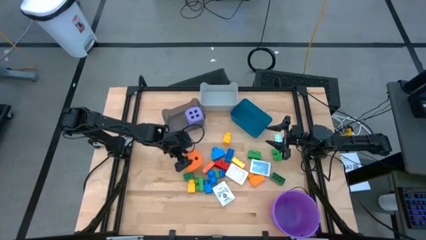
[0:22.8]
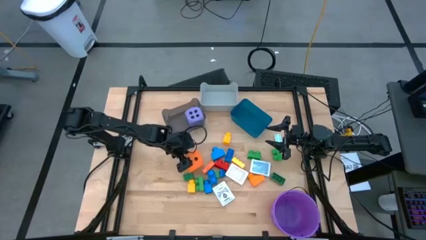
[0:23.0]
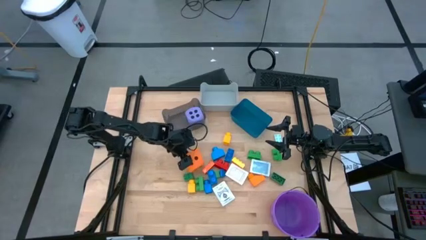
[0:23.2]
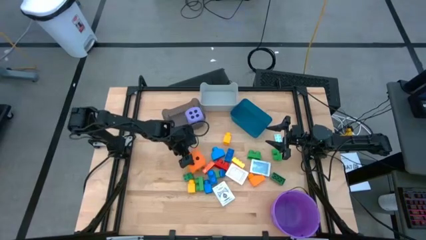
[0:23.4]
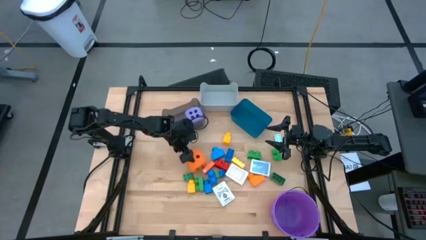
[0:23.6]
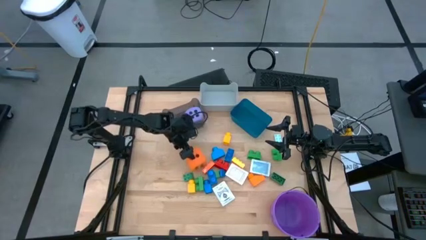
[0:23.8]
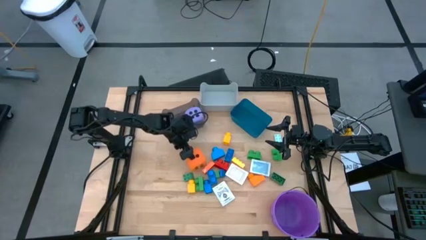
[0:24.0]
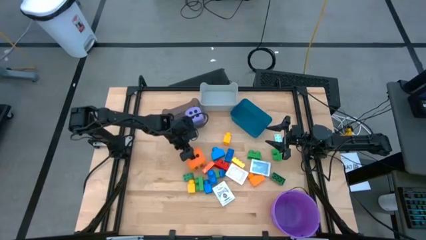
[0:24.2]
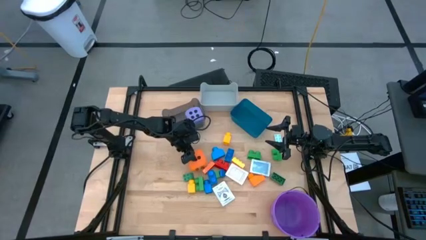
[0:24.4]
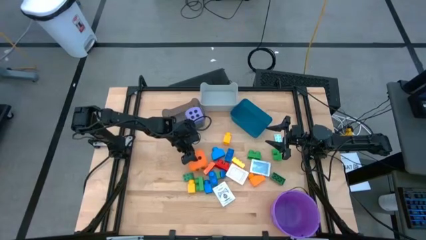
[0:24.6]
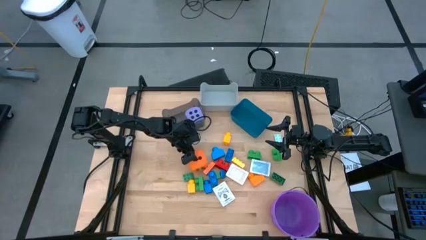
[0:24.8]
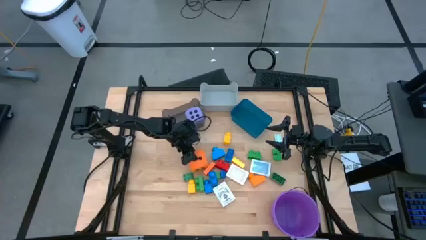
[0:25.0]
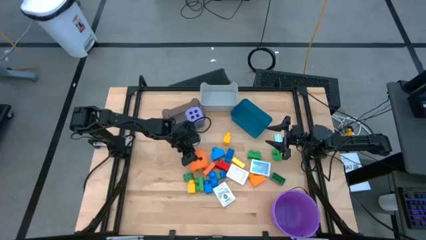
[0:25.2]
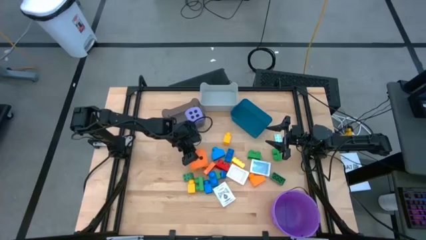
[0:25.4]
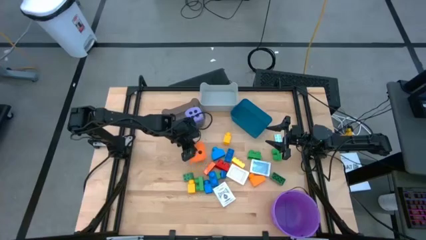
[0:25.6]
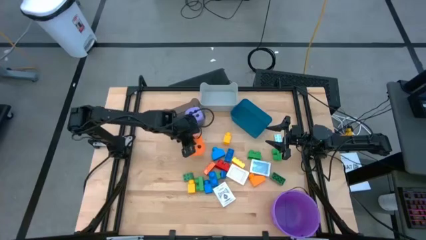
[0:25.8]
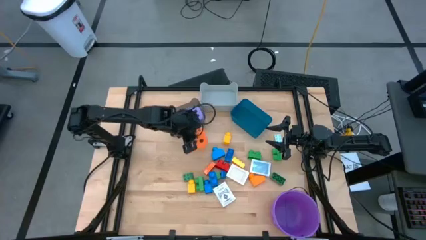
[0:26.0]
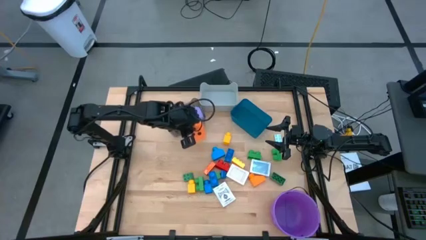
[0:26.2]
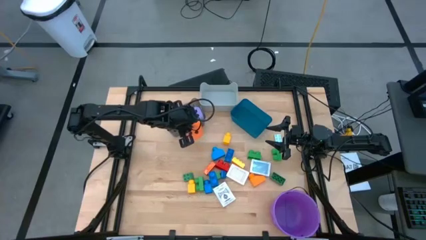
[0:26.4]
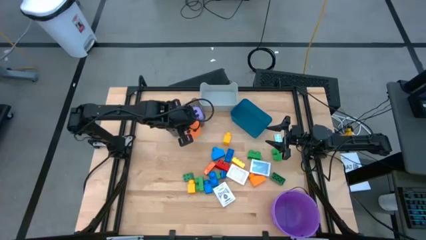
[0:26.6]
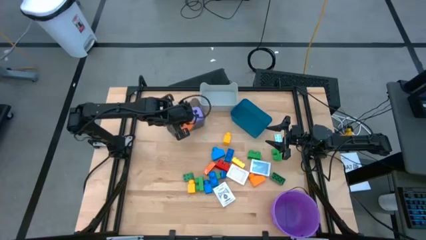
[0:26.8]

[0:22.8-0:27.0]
Task: Pick & Place Toys
Put the orange dice into the transparent black bin

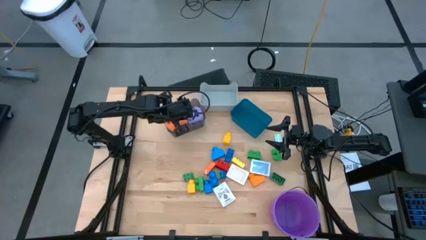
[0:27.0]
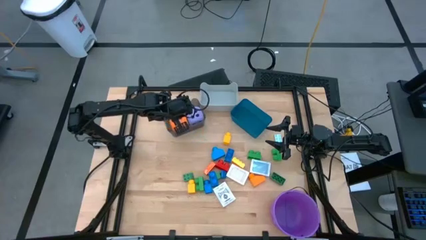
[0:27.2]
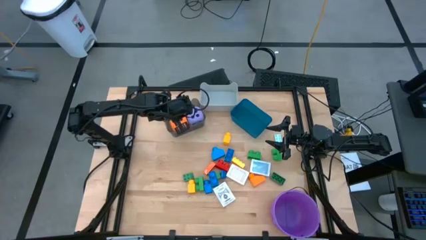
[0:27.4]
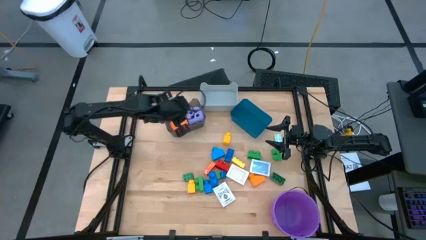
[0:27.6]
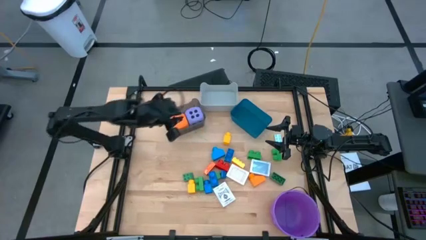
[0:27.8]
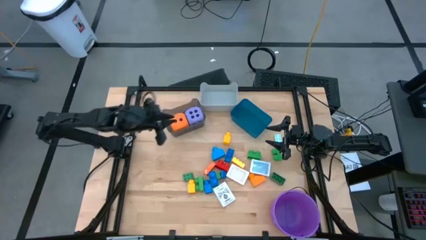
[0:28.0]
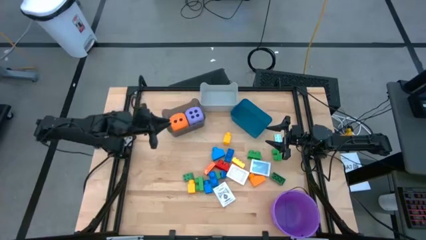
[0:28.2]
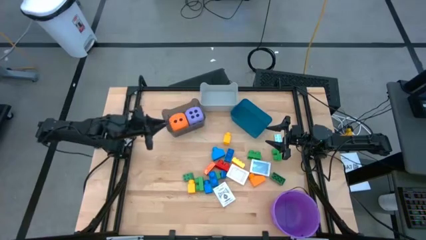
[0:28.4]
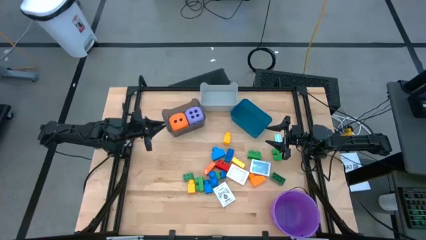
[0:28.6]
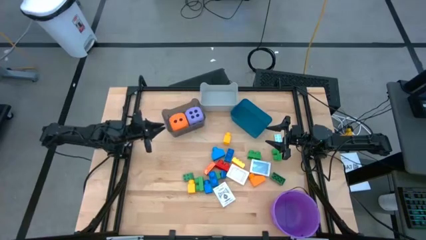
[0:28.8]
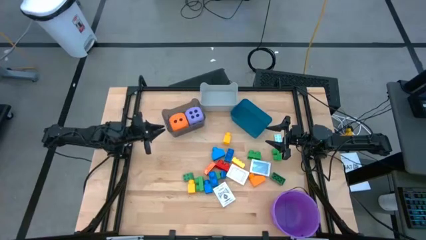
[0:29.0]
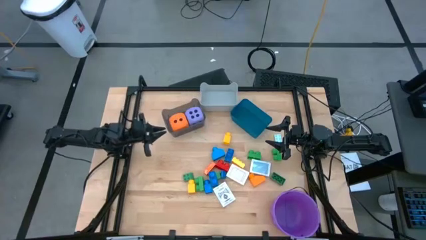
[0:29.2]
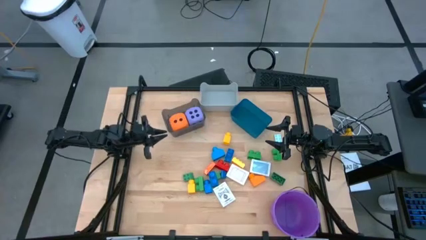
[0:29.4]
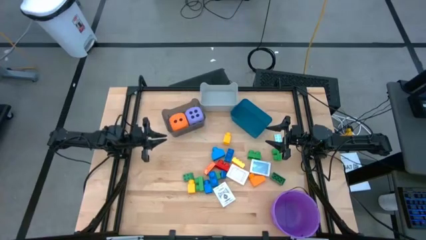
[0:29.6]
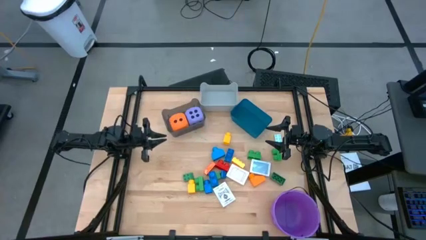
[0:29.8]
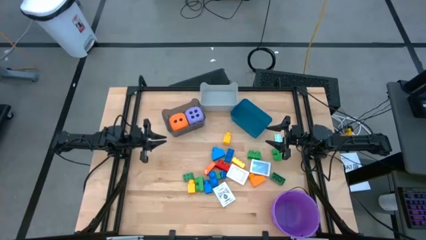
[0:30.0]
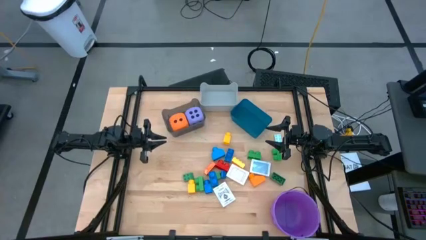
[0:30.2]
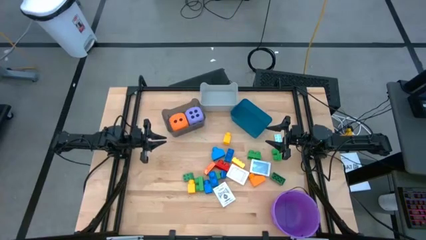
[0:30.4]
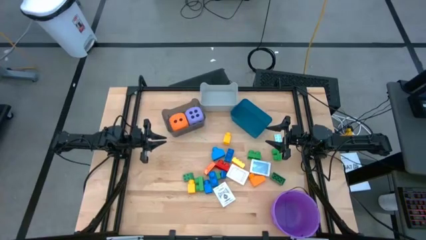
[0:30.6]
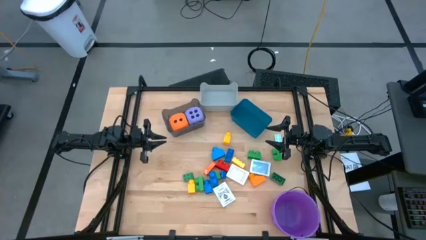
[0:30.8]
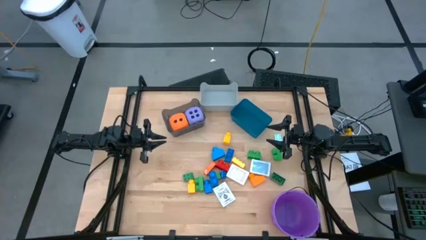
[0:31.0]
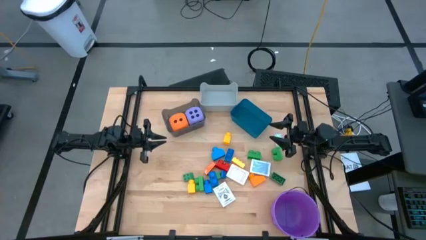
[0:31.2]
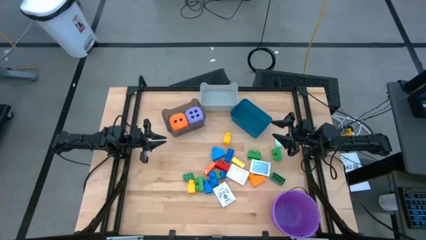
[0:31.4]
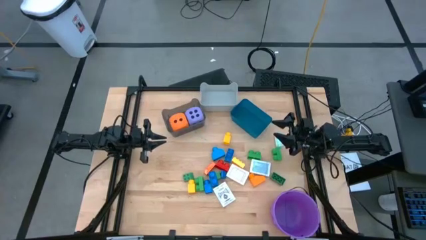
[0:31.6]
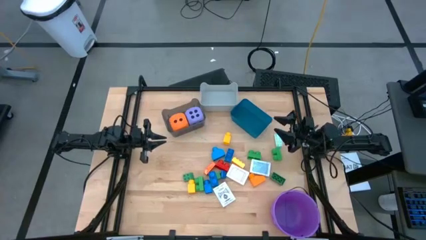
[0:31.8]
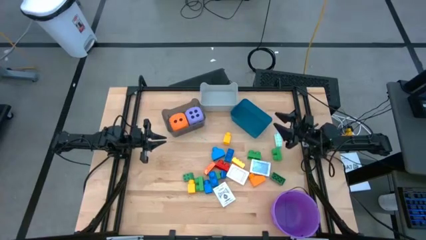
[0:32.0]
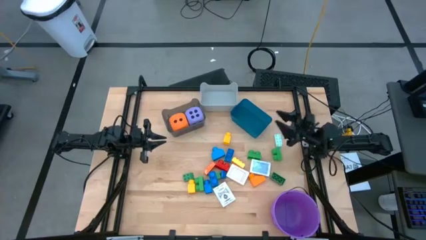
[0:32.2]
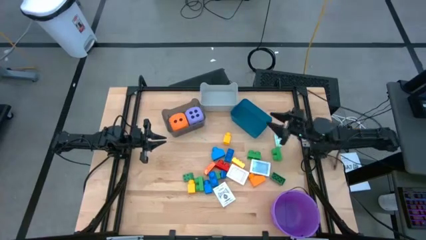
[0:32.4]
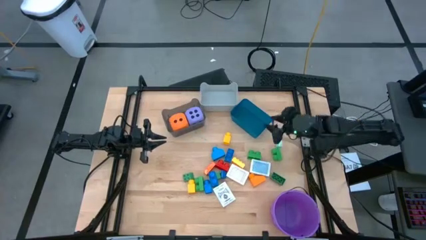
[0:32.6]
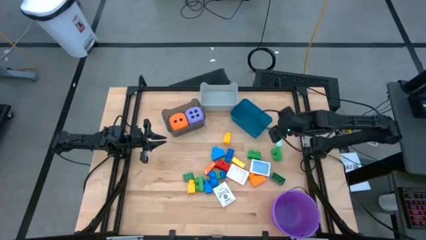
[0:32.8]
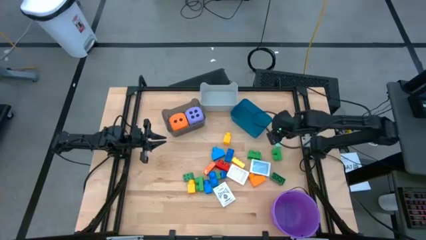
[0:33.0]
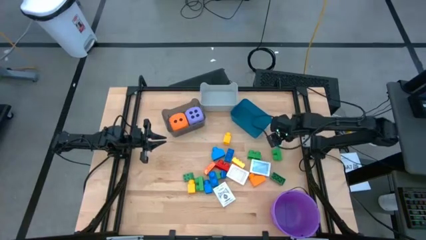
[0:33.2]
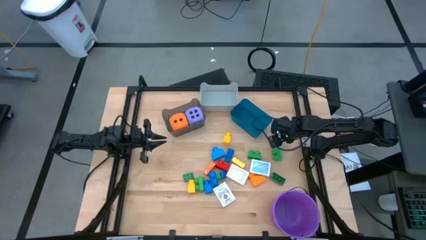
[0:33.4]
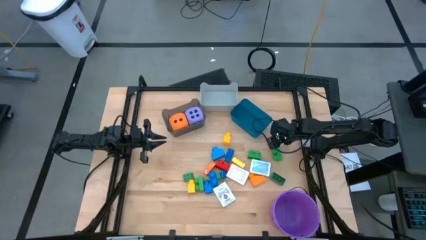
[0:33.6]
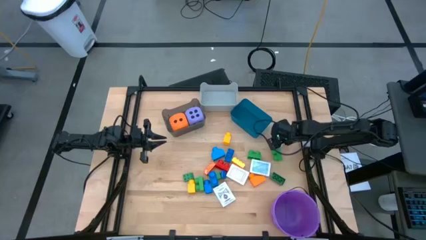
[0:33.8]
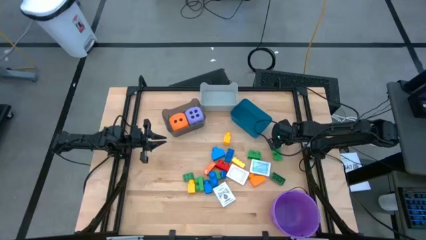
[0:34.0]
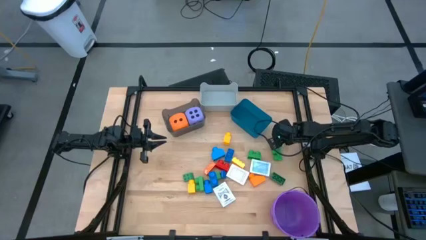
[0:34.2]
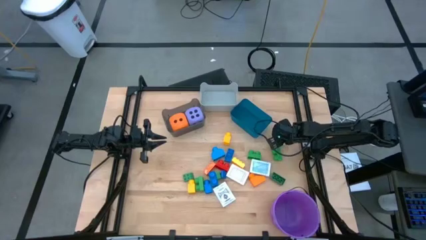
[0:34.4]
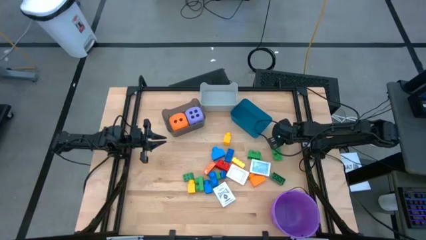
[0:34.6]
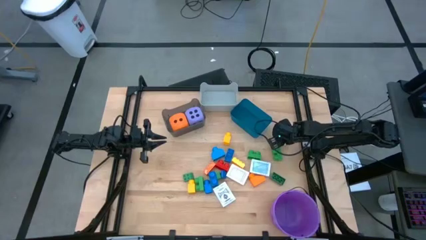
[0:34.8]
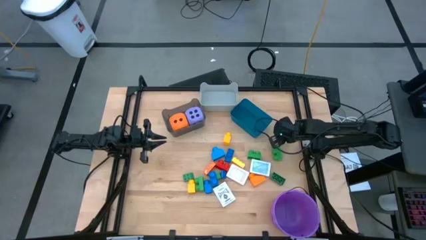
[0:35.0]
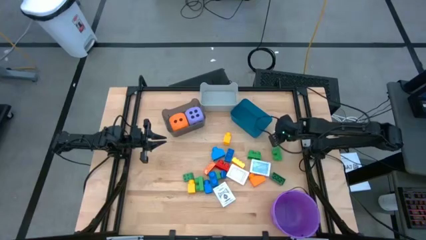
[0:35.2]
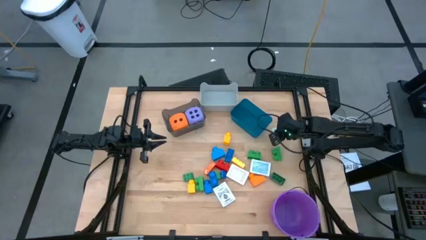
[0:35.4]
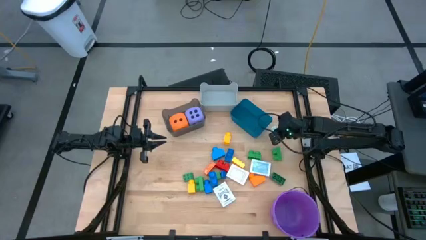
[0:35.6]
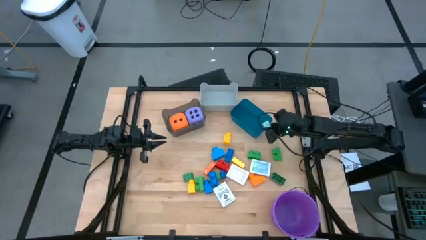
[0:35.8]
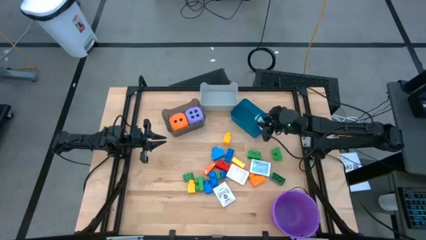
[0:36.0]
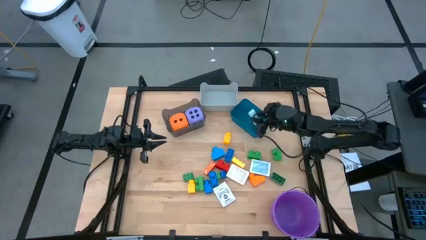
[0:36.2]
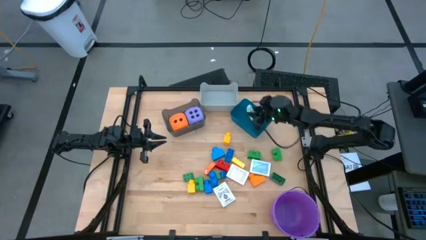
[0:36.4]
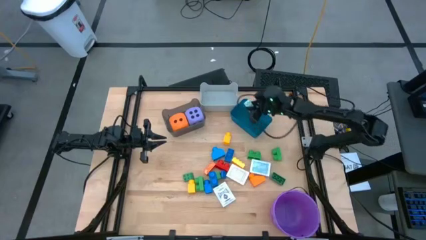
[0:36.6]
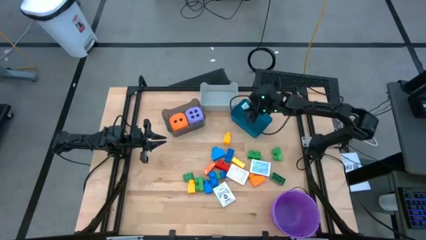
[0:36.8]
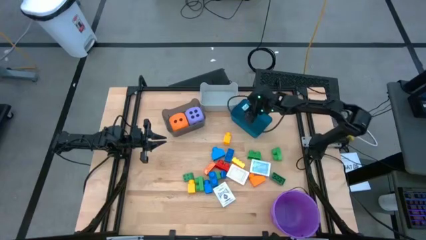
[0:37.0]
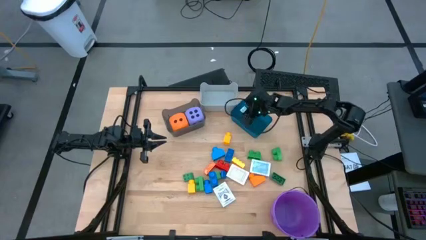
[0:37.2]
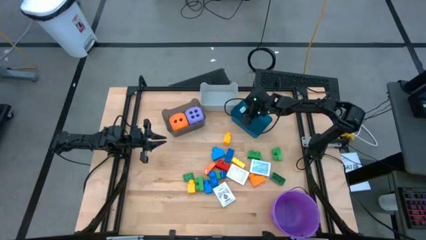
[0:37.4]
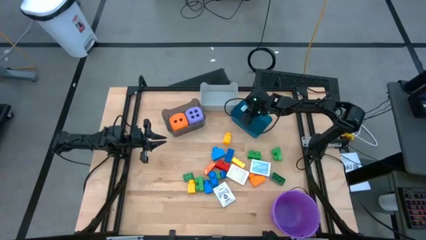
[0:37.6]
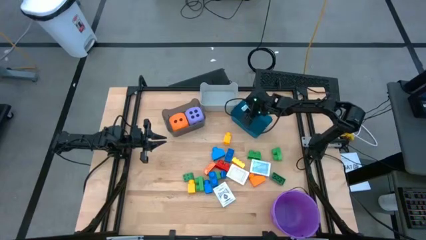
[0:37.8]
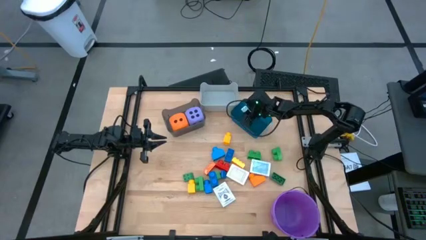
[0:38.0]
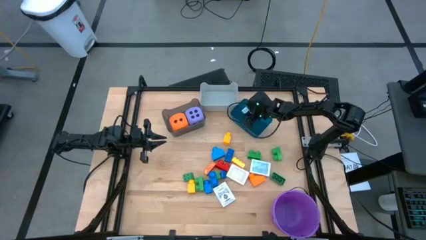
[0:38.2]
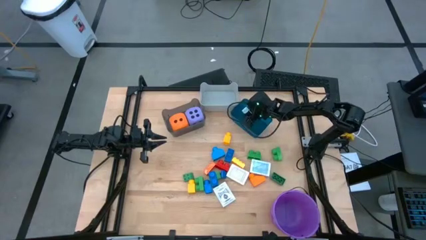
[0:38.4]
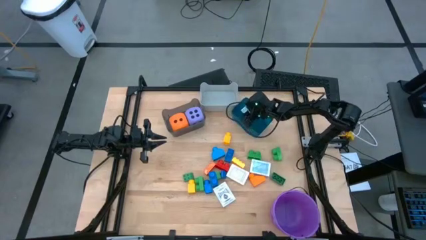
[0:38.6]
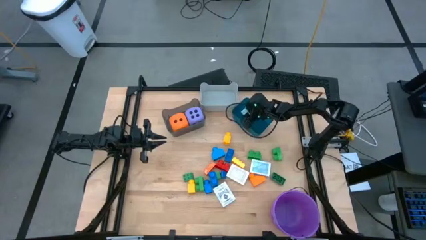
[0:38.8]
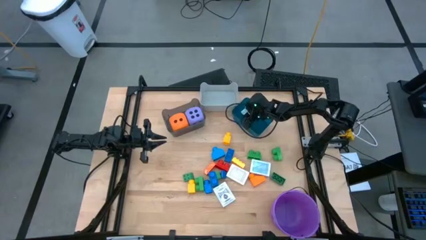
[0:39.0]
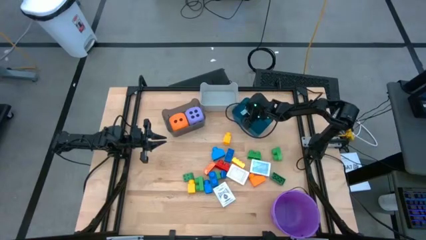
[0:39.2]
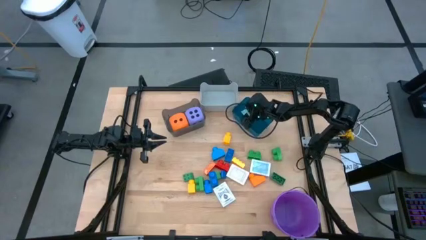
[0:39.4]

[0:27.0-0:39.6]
Put the light blue 8 studs game piece into the blue bin
